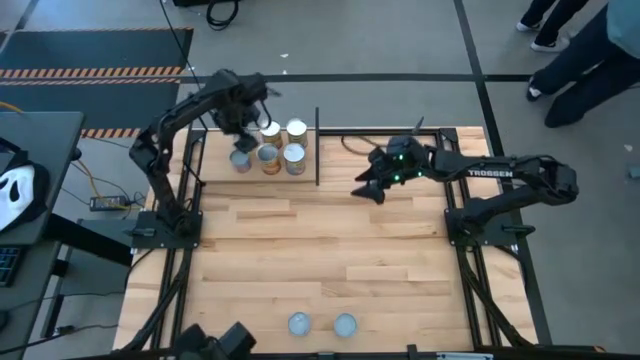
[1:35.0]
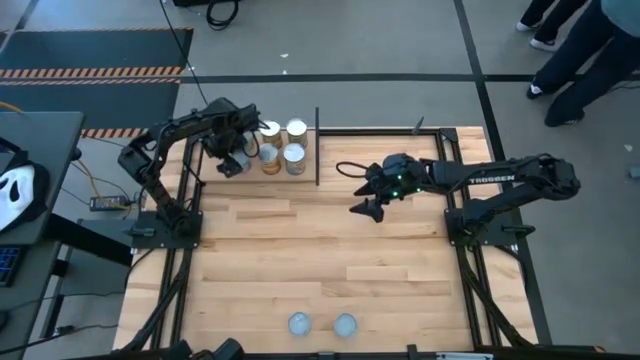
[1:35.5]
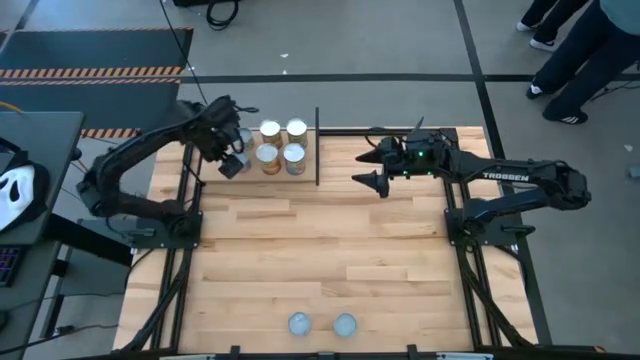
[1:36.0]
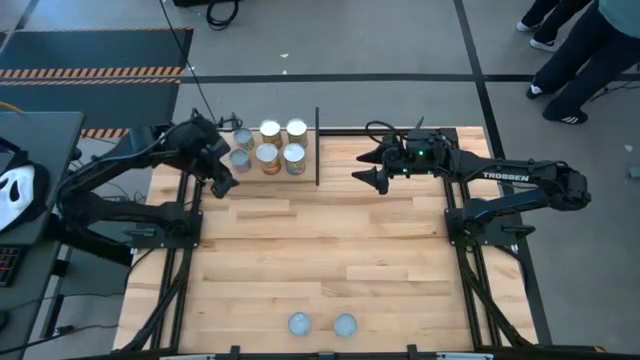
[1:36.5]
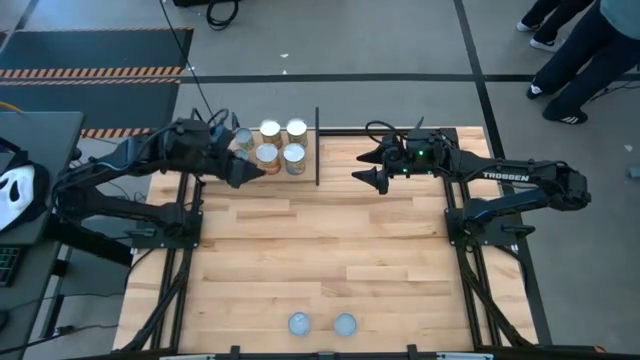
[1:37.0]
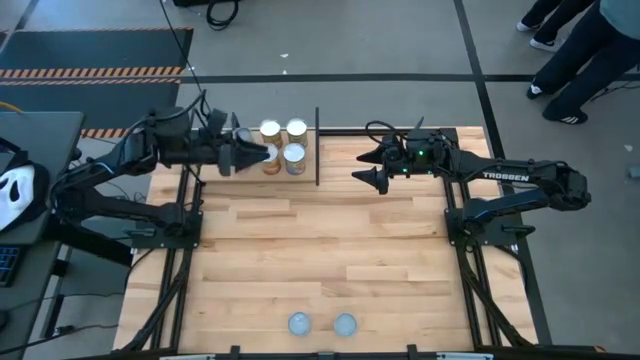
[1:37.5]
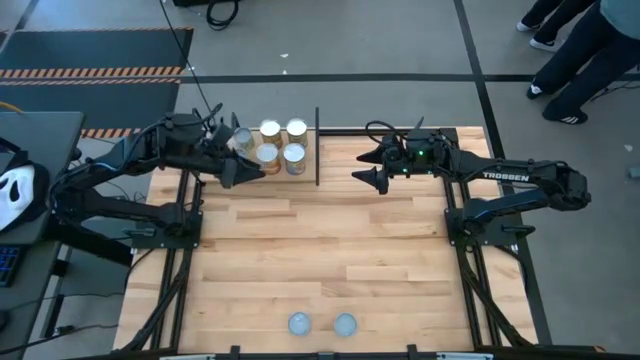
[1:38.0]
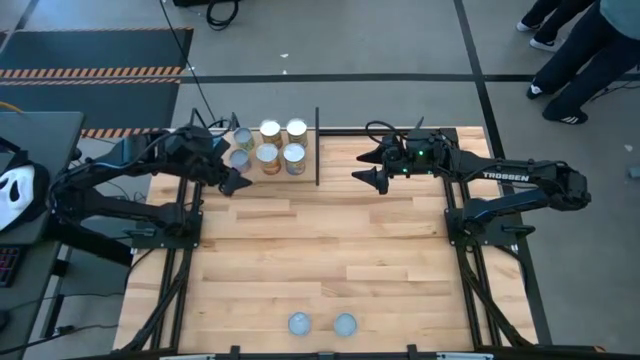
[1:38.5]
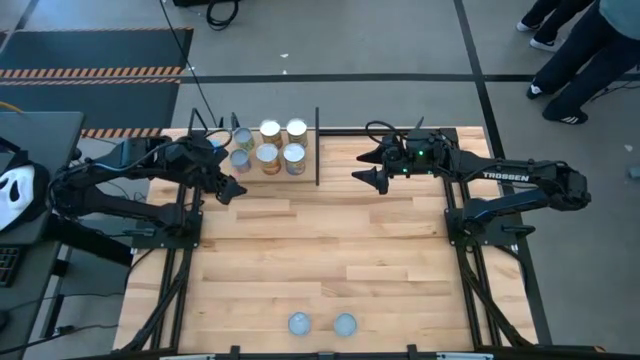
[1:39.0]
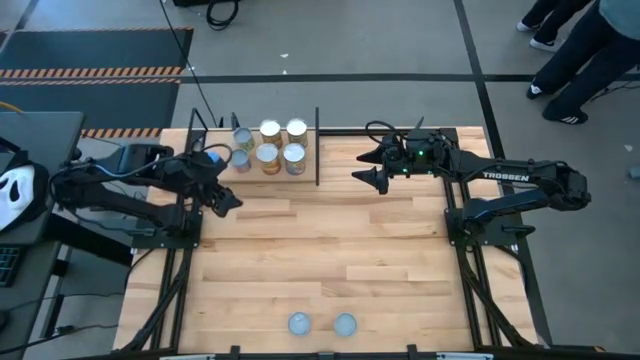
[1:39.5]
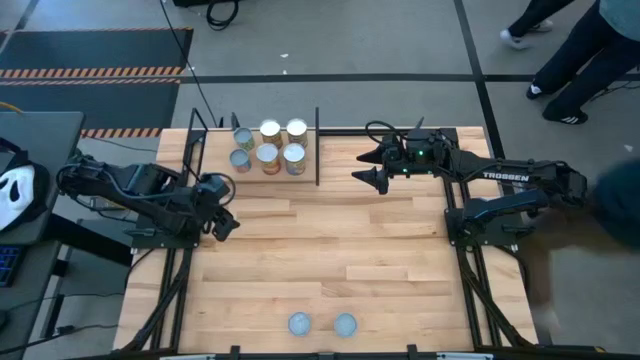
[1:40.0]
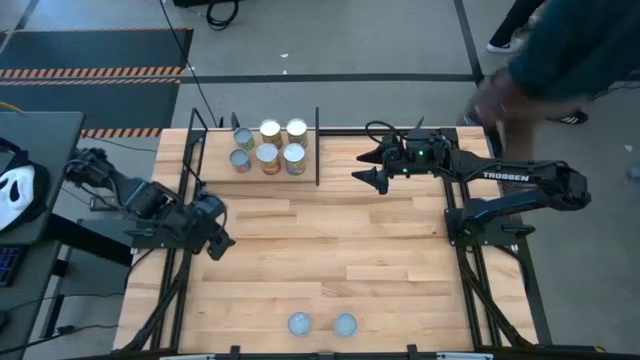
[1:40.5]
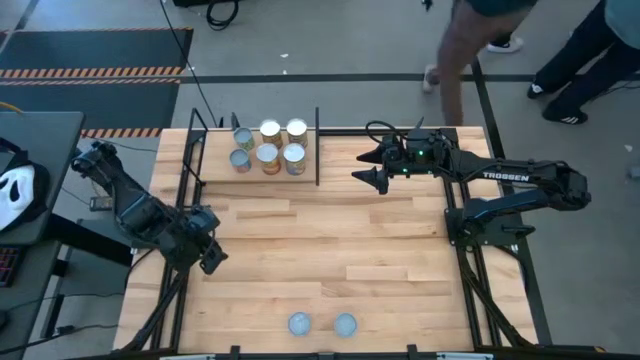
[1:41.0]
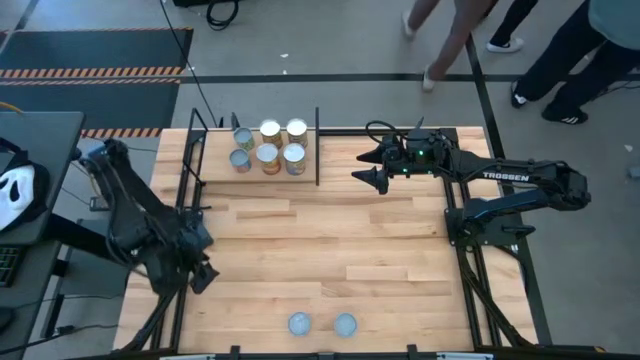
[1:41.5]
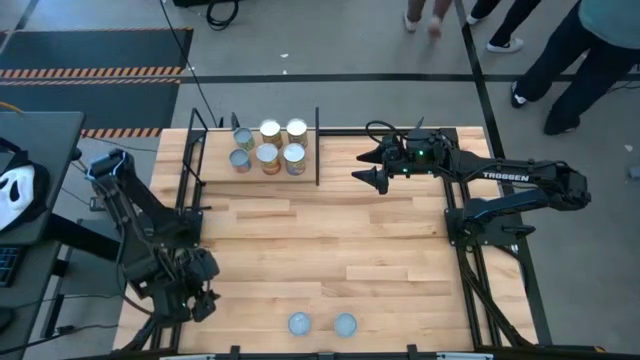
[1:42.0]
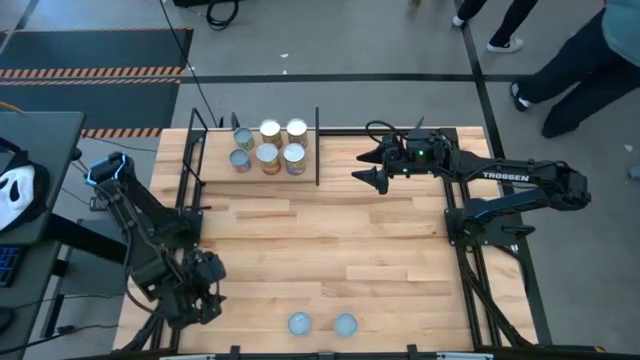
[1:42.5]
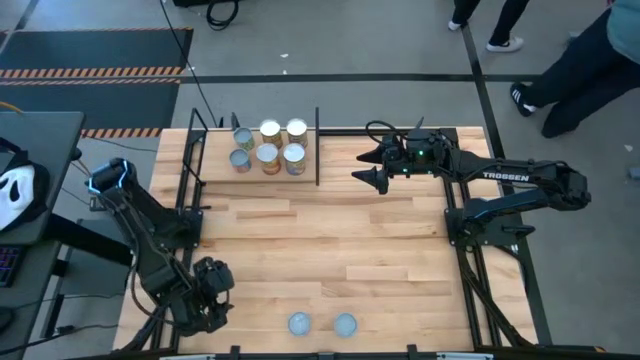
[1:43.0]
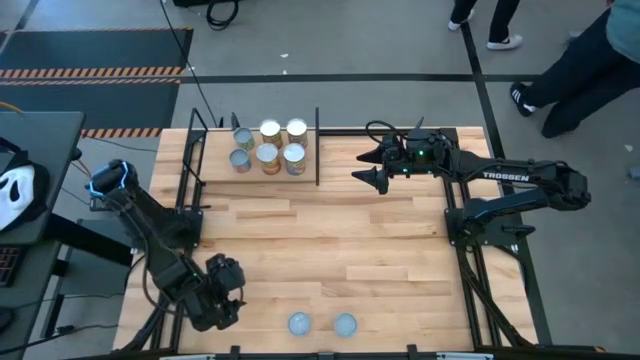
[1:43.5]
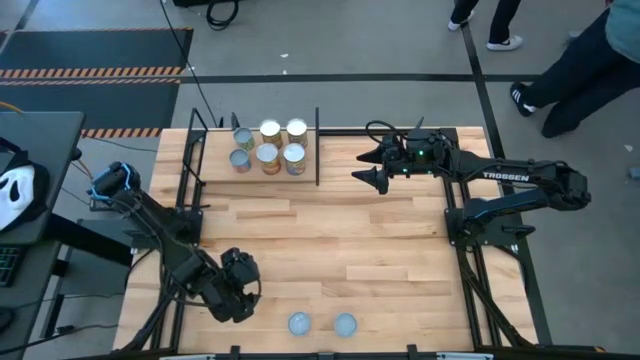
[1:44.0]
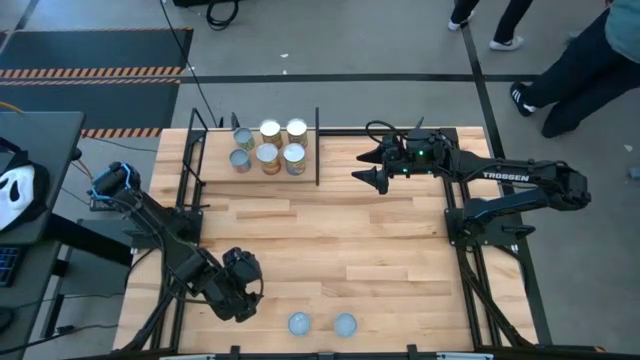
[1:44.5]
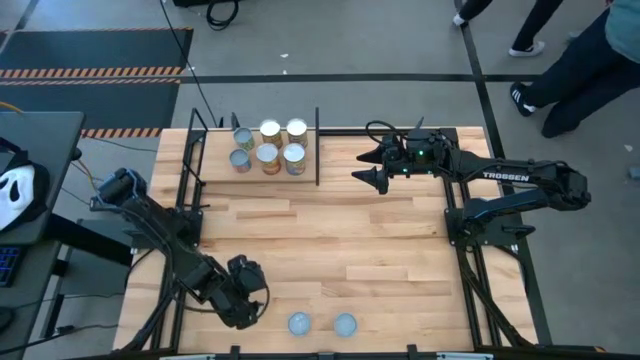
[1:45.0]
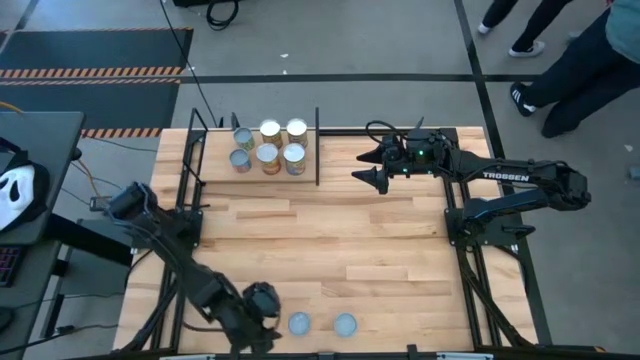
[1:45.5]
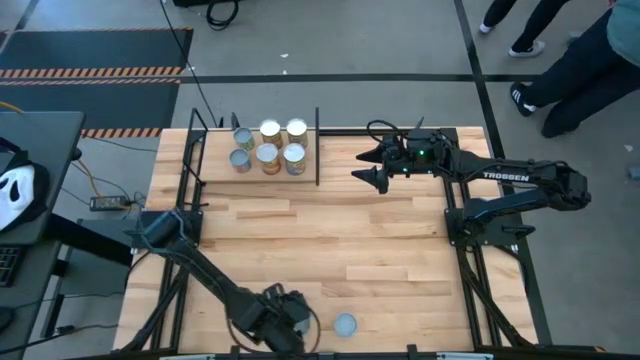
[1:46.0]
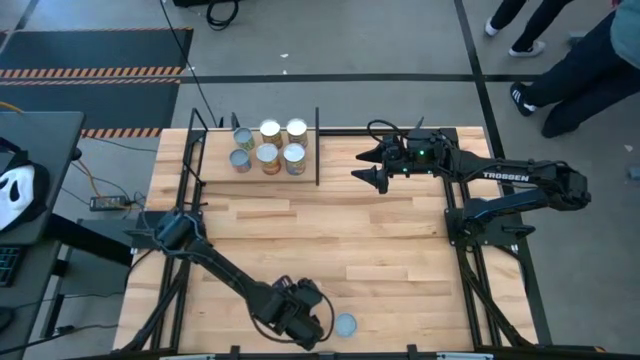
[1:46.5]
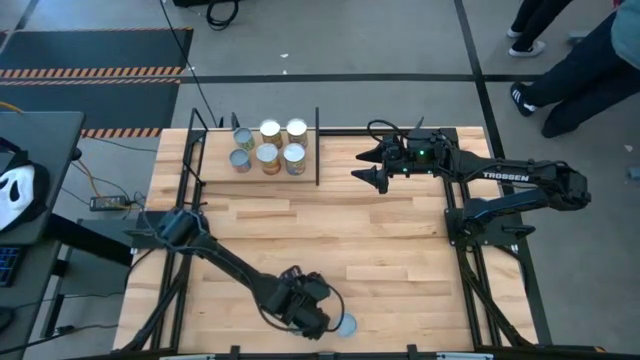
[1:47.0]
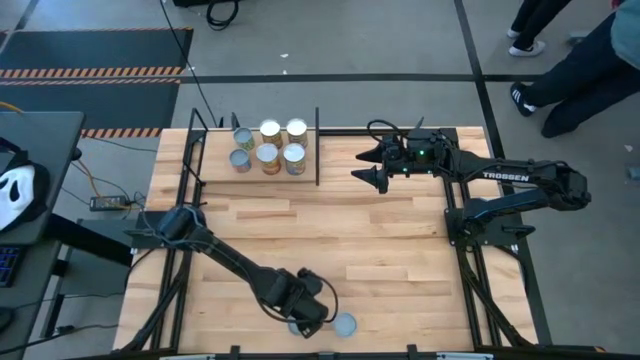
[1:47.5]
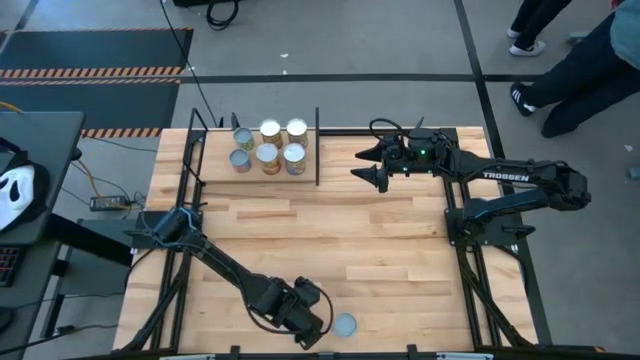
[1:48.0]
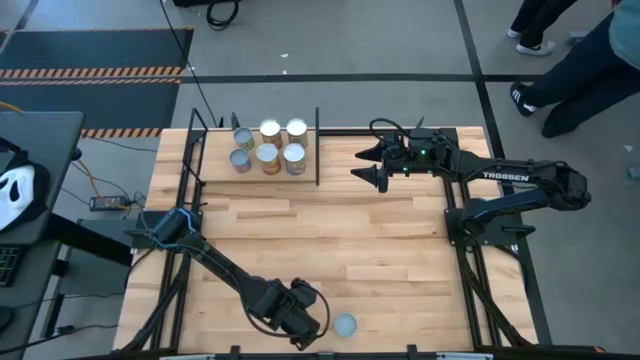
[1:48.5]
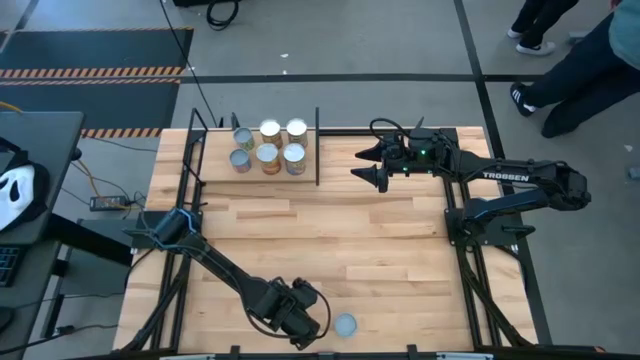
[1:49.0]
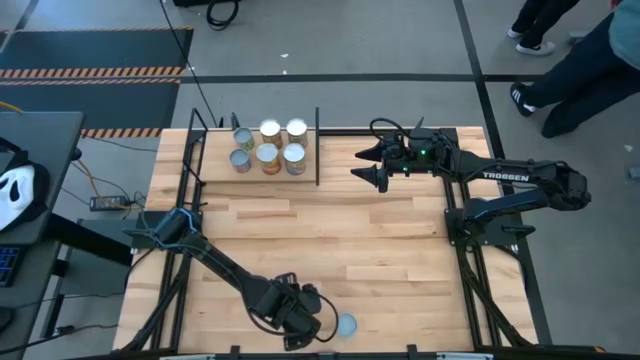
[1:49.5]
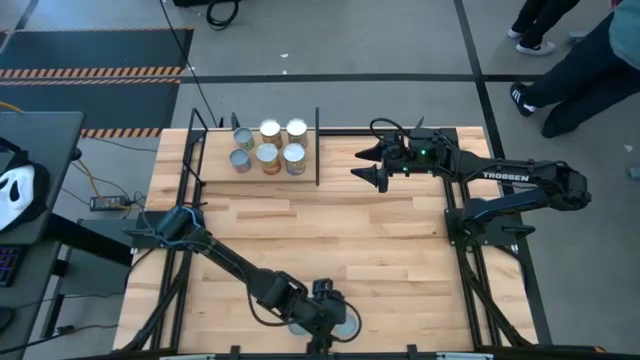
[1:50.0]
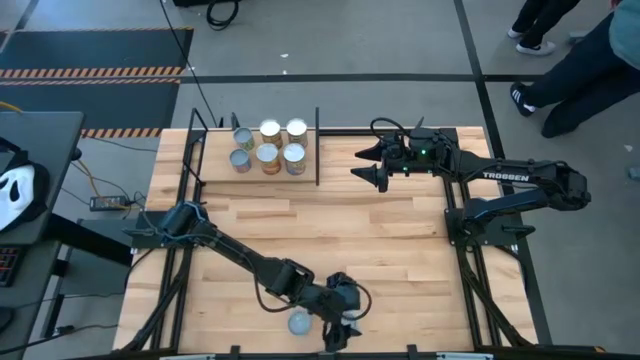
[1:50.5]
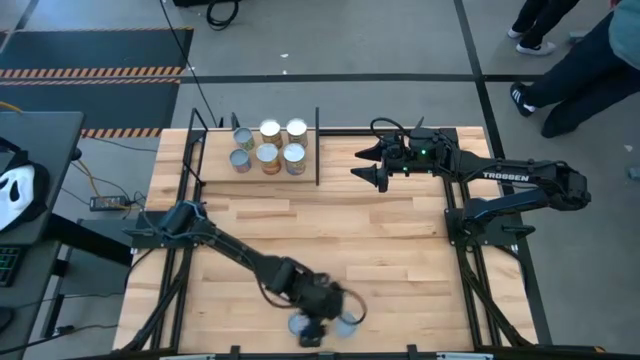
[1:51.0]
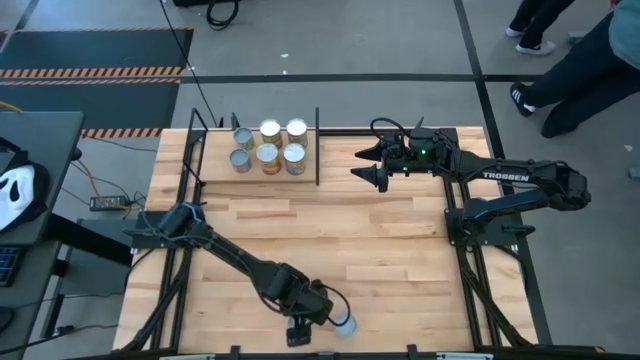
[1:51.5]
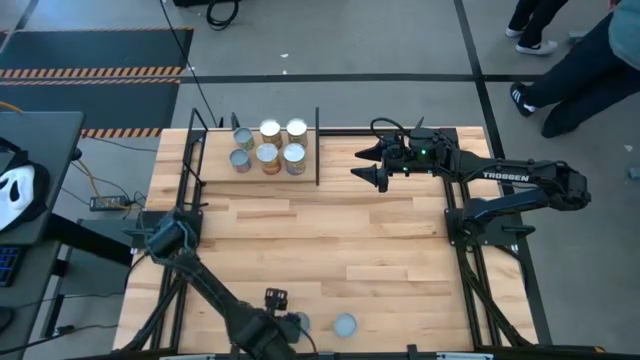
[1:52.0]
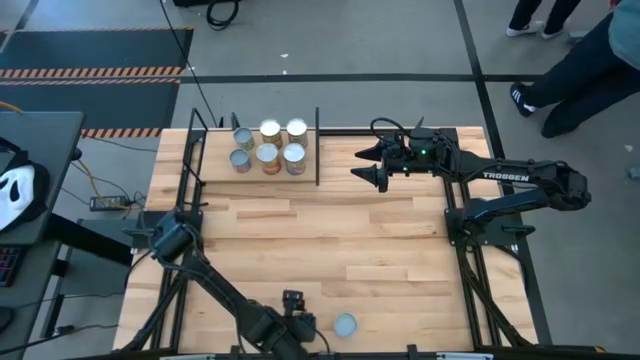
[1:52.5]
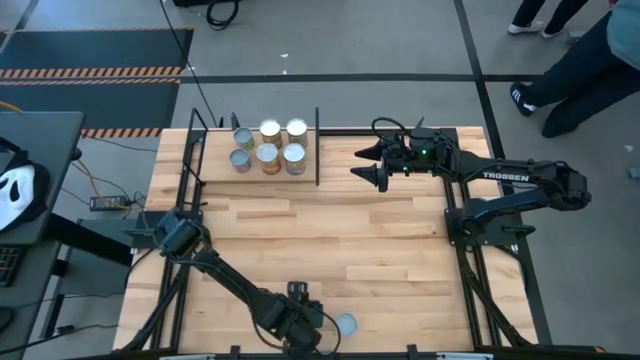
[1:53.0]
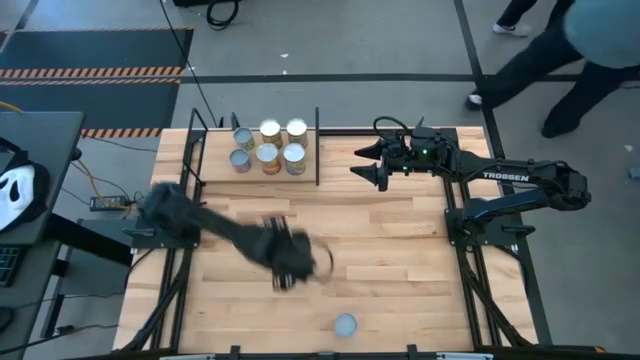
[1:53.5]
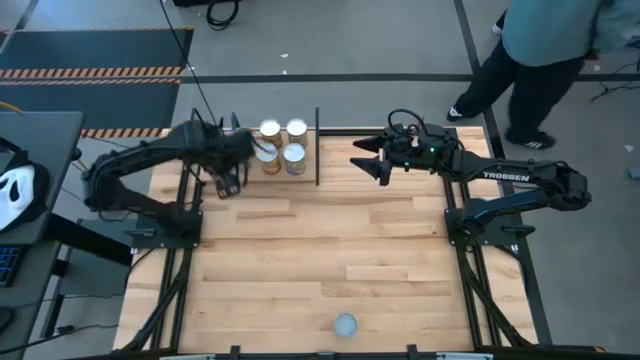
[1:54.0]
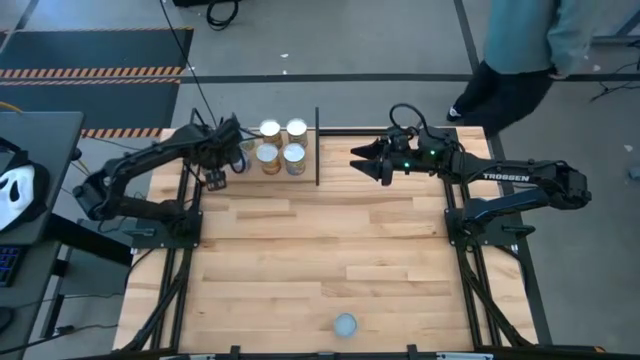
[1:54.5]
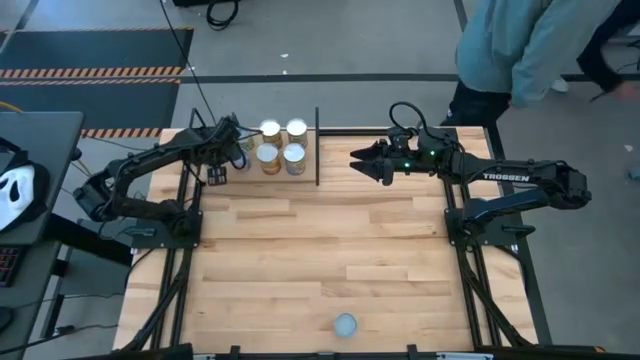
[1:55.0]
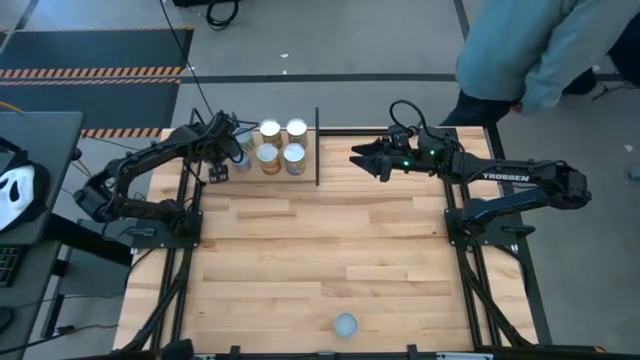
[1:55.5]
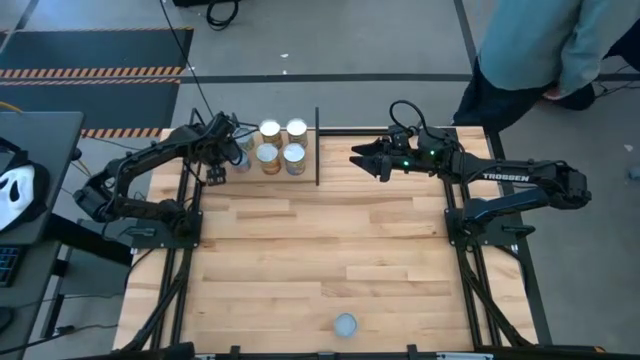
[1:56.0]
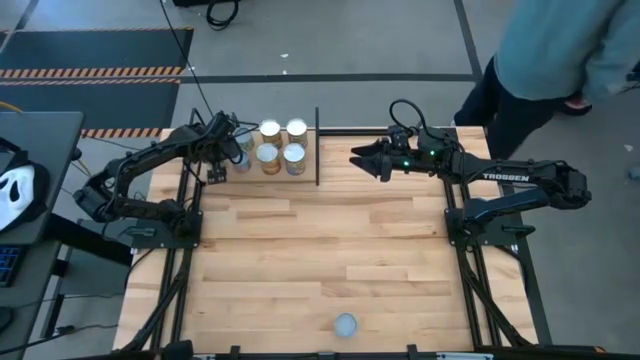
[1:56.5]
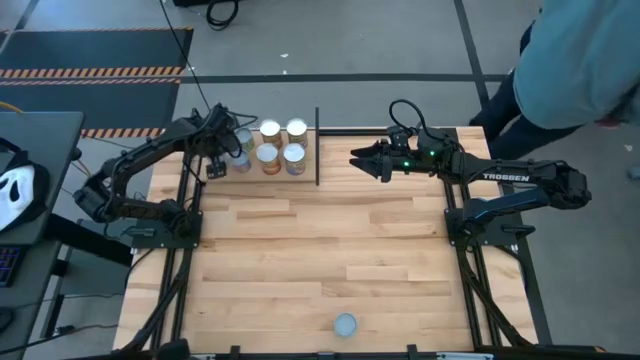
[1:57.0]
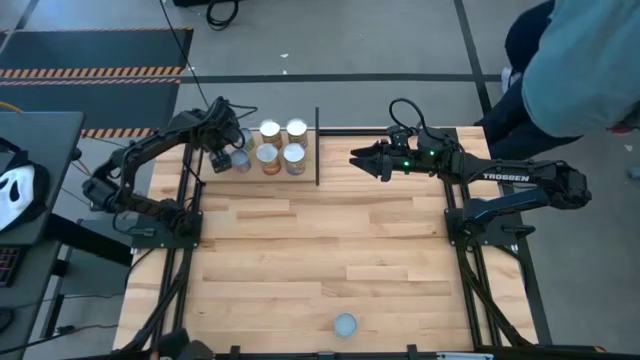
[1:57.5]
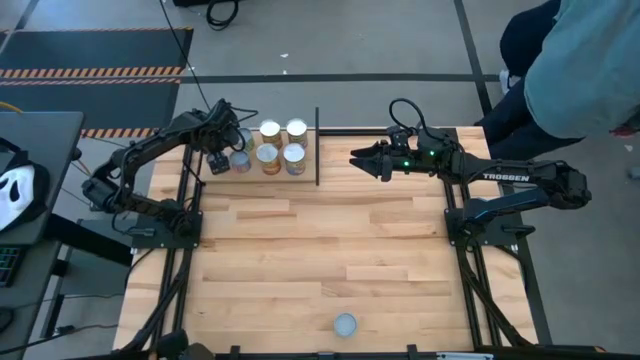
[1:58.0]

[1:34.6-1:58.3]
Task: Pick and place cans onto a shelf
Put the can of oranges on the shelf
